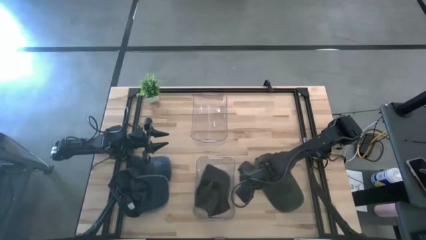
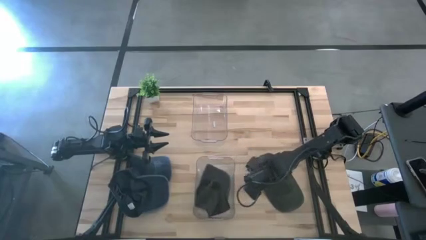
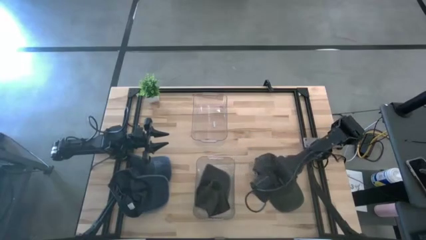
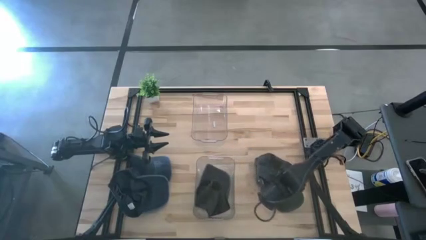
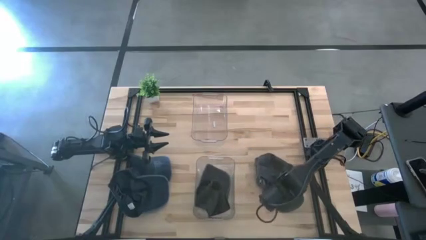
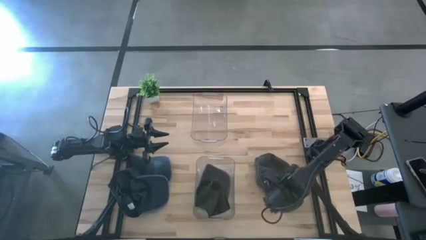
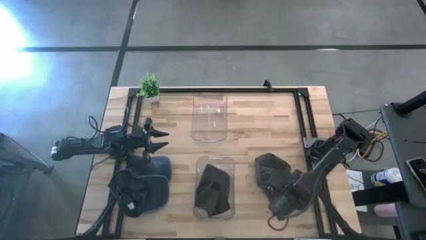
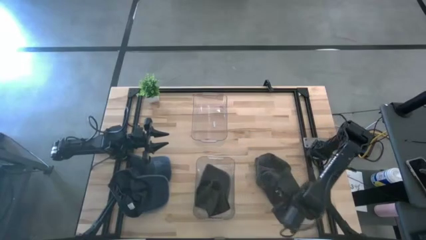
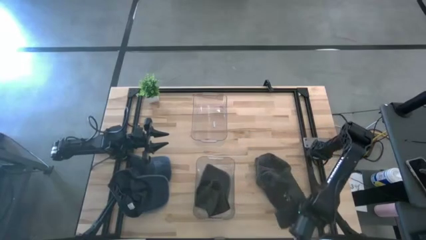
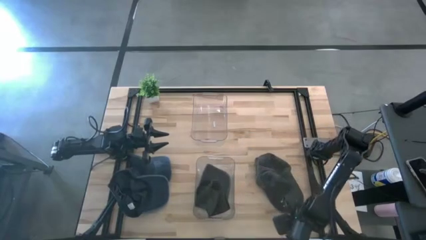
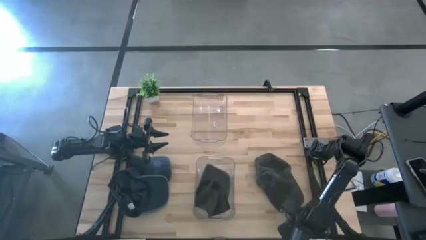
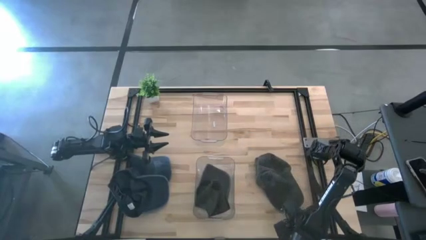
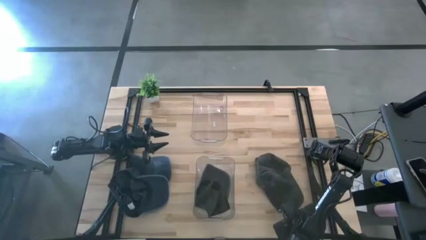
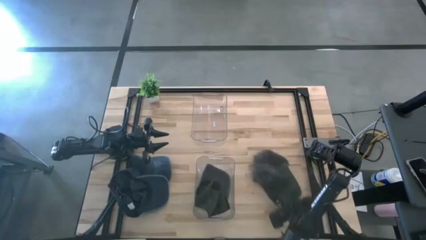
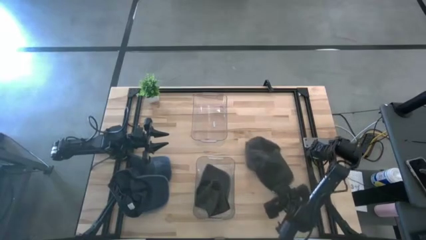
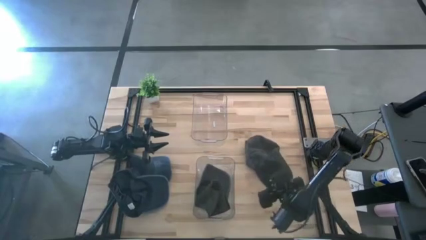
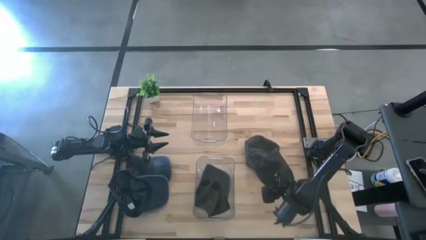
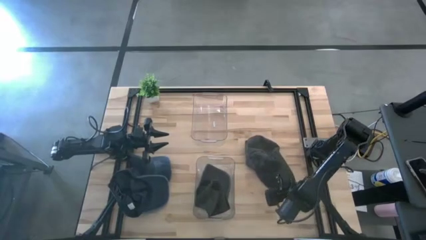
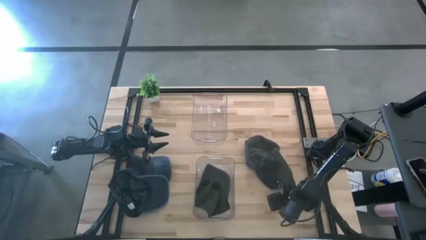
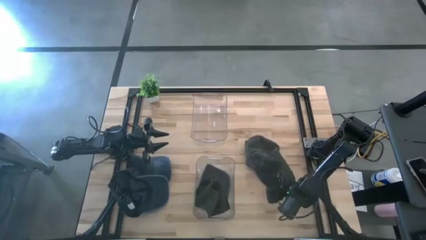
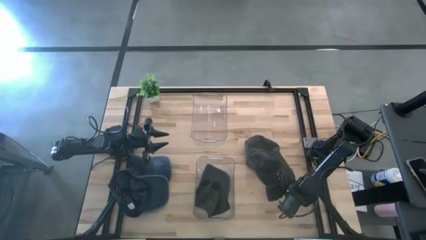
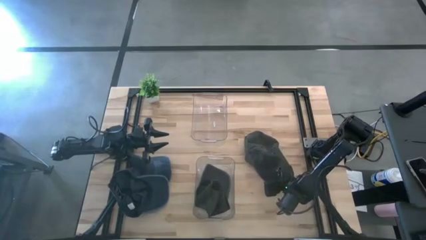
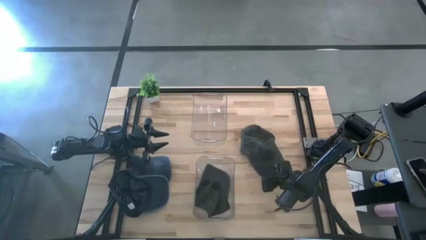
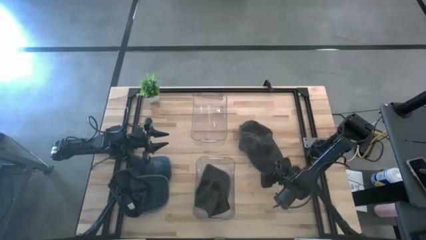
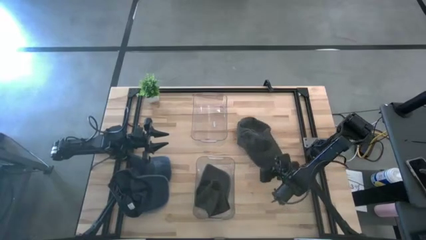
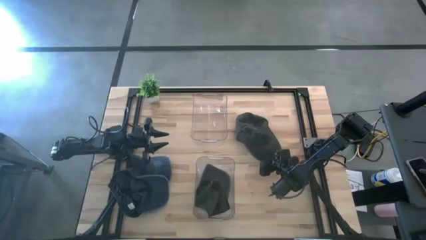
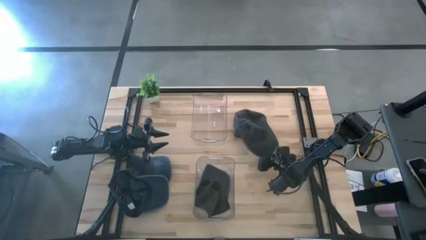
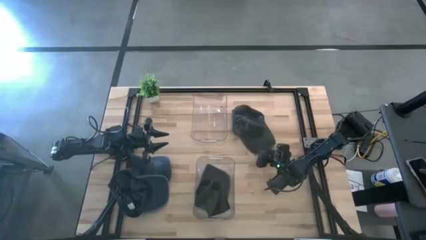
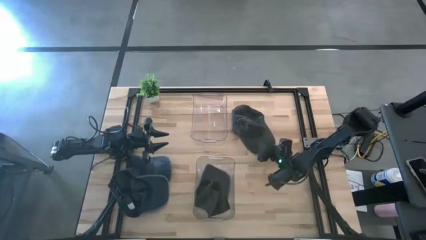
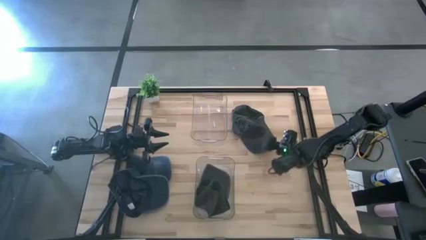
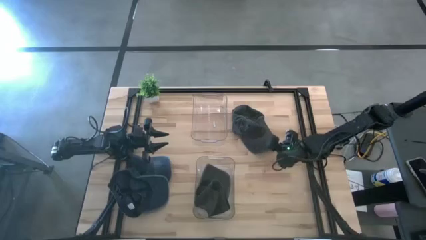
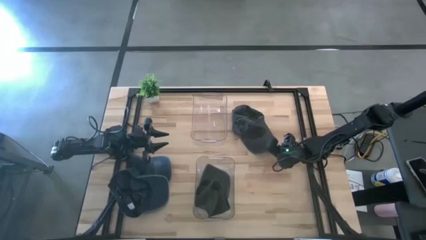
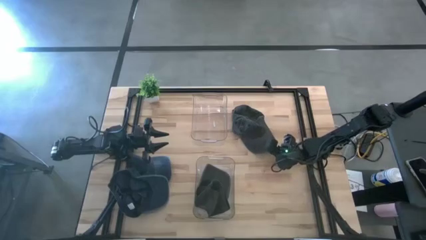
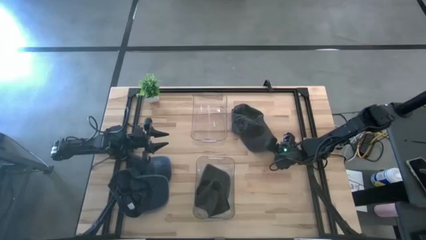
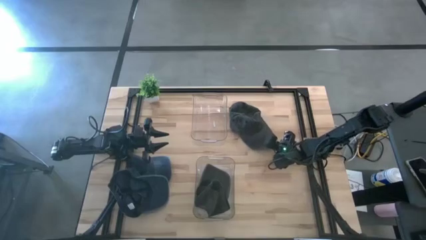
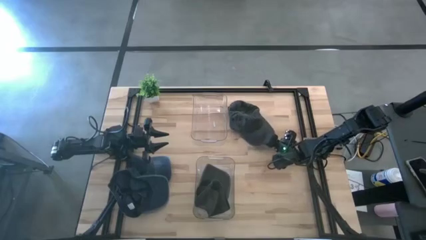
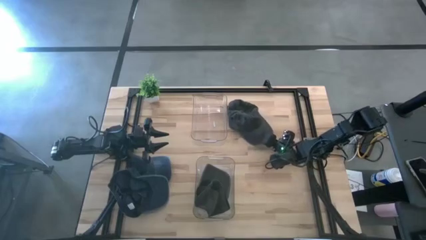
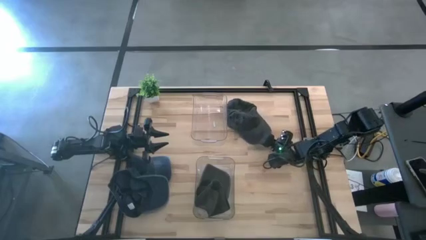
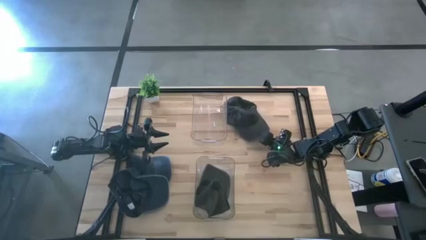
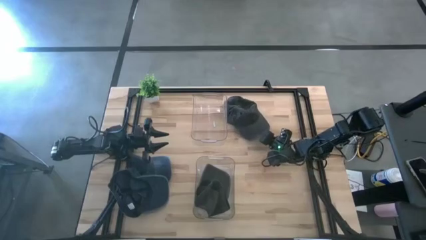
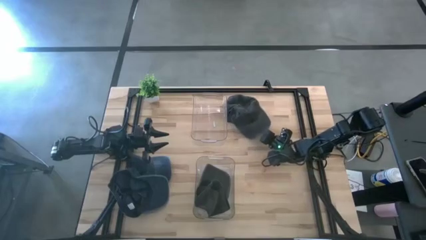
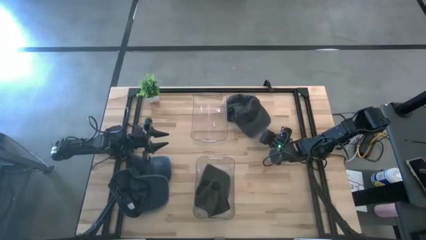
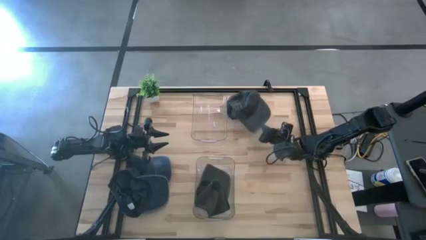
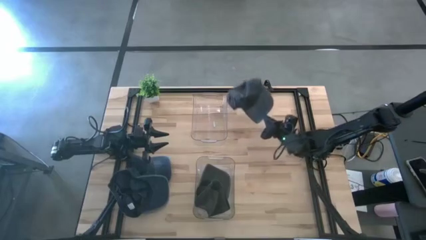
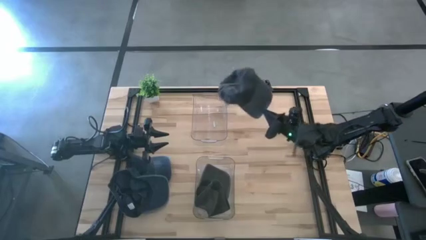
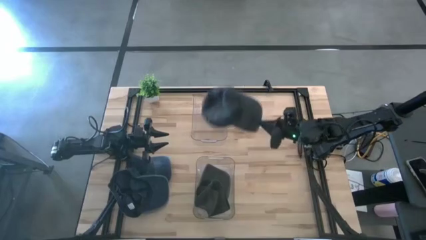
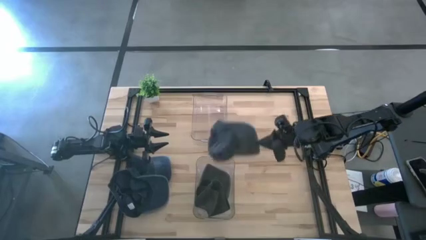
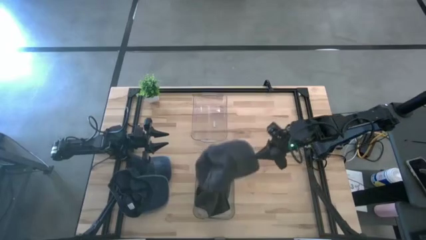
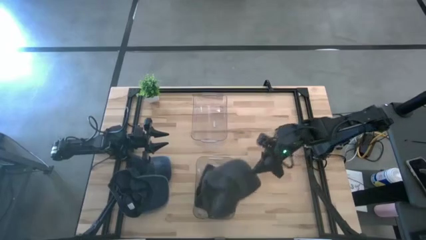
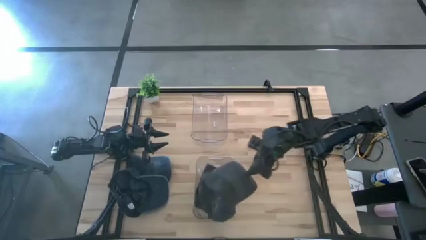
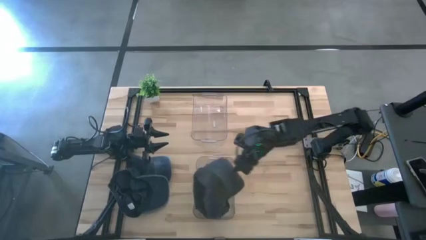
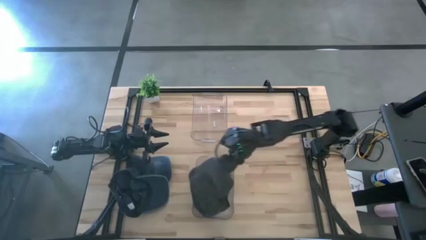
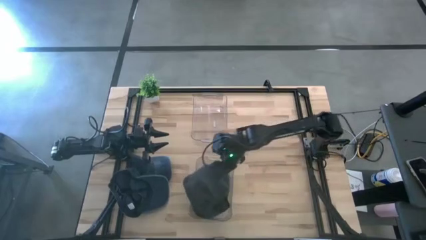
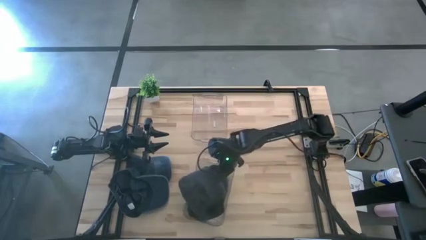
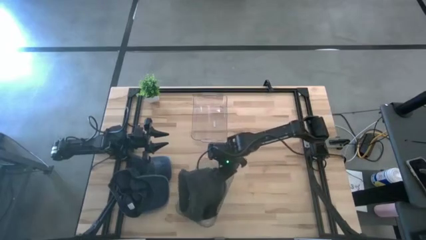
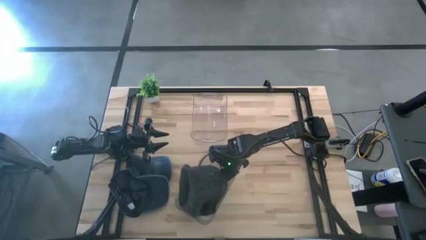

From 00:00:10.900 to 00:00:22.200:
Task: Pick & Place hat
Put the black cap into the bottom transparent bin

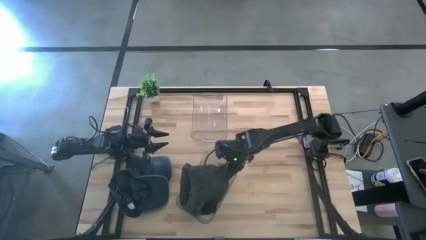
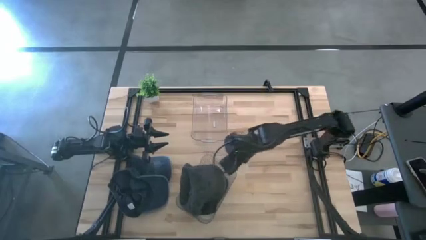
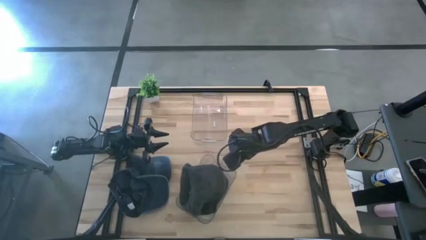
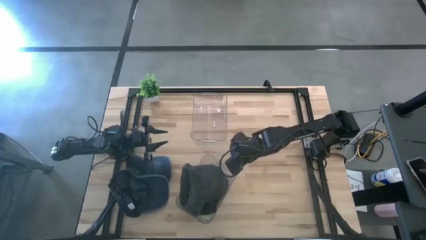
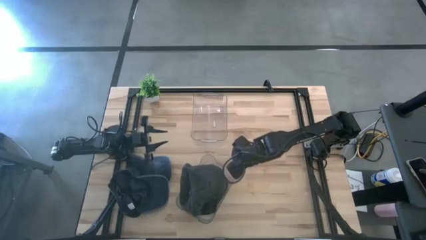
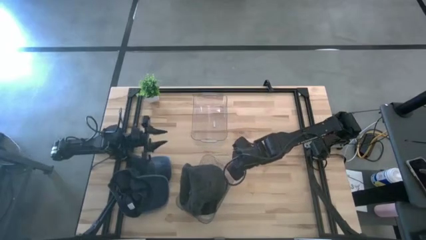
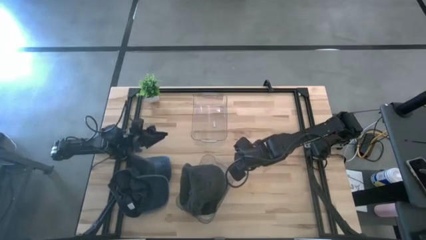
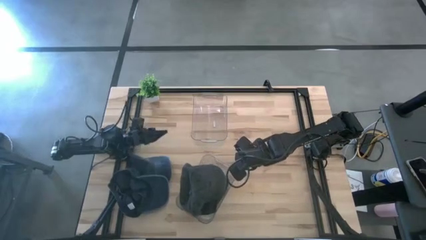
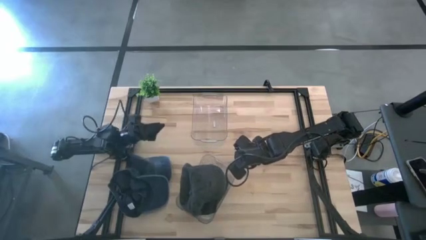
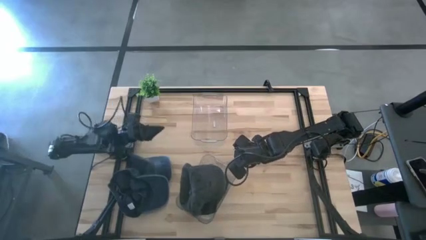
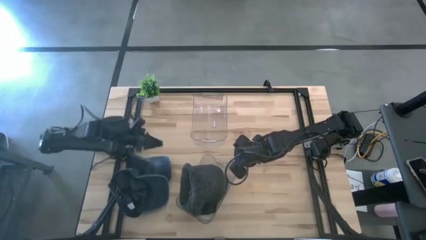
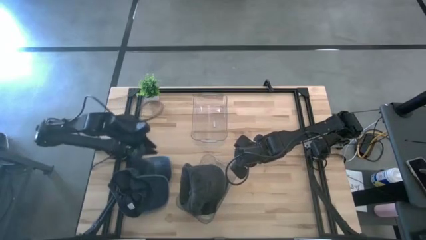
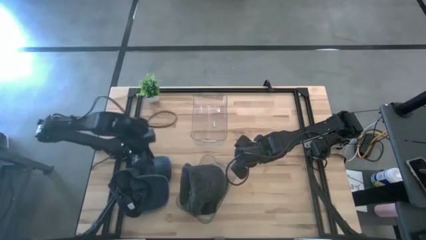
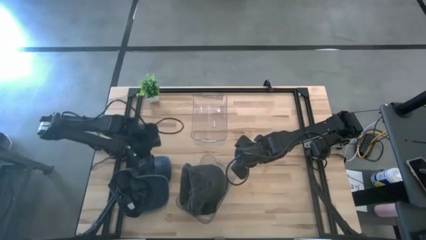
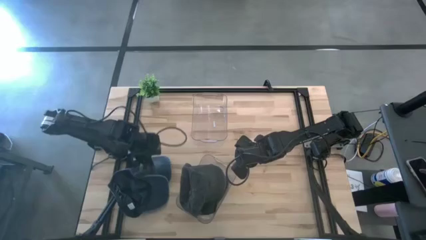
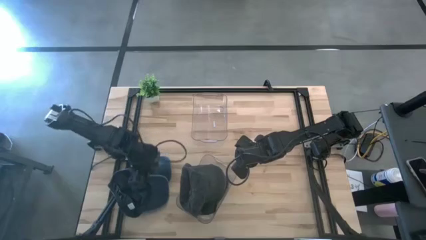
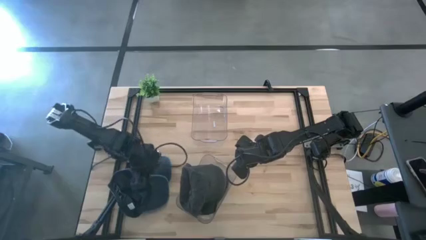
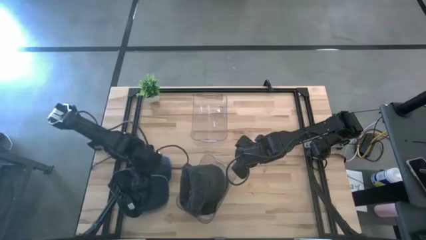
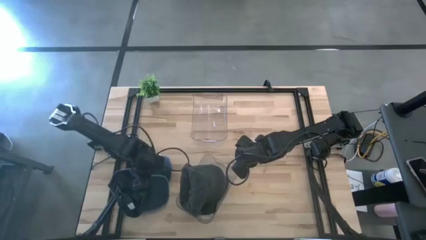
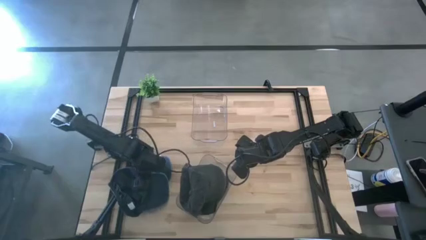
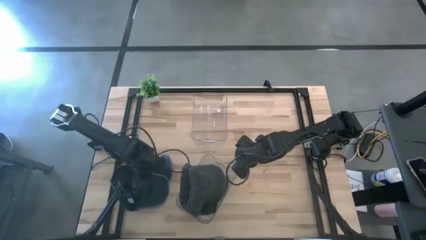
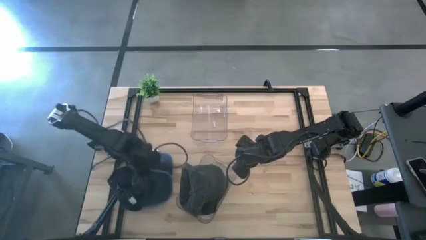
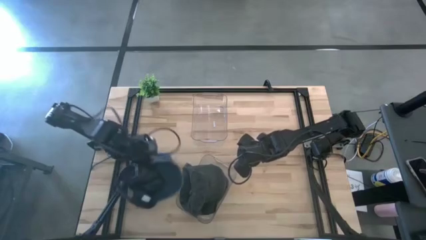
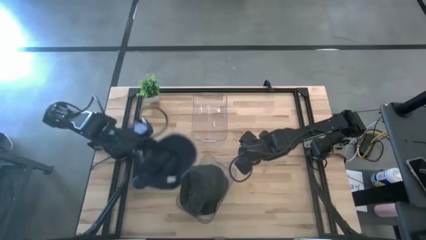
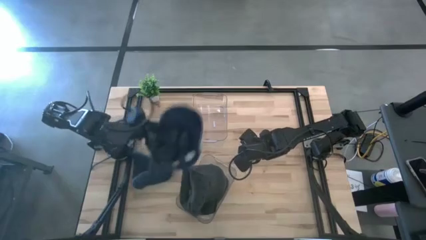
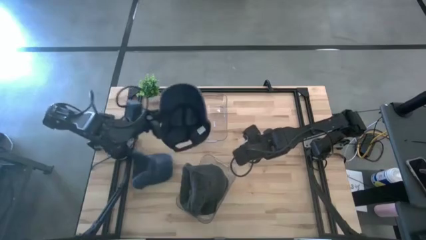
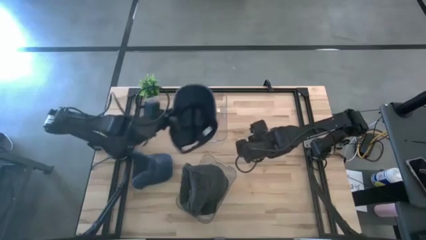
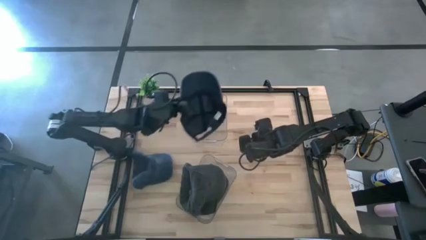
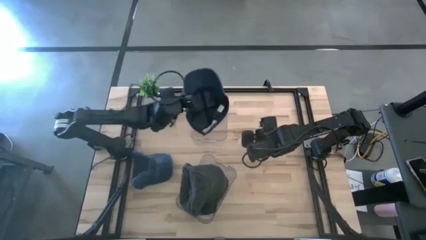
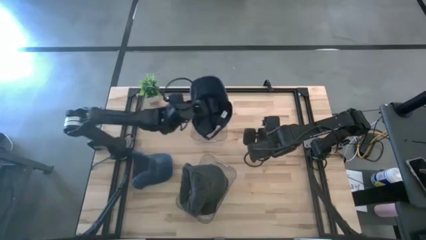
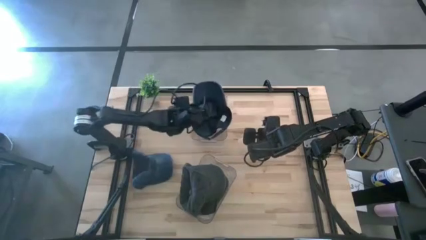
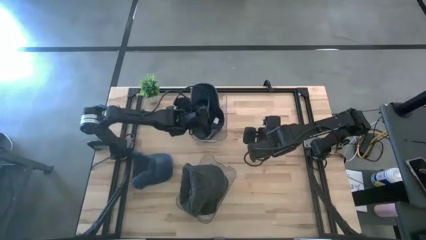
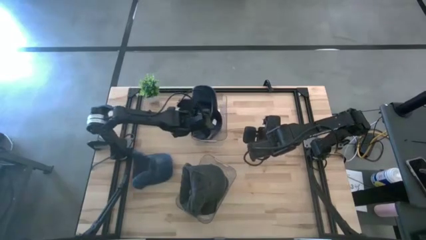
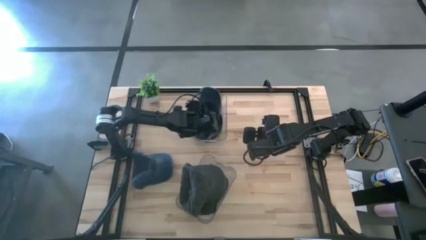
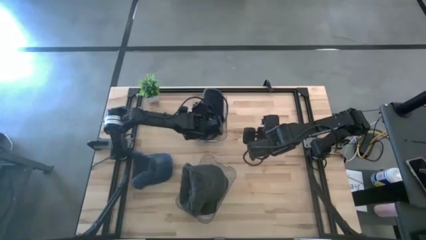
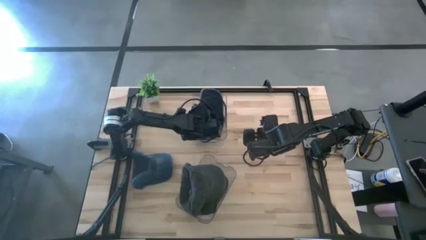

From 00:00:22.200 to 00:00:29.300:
Put the blue cap into the top transparent bin
